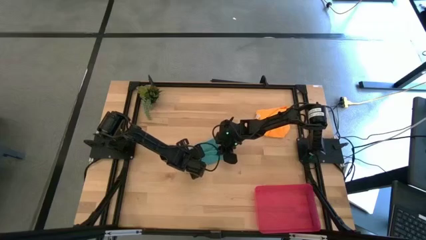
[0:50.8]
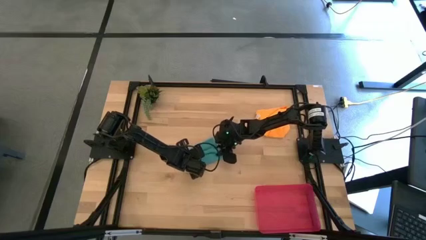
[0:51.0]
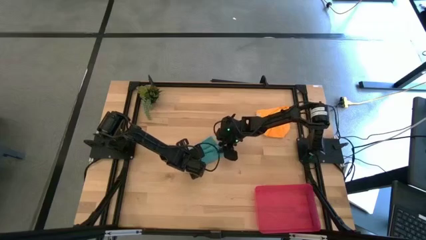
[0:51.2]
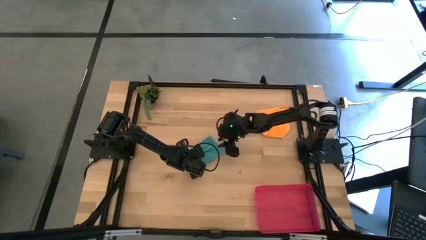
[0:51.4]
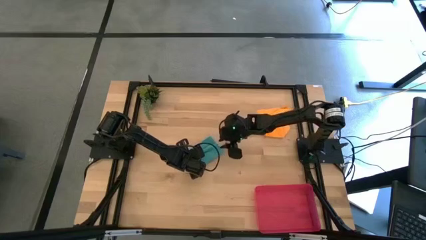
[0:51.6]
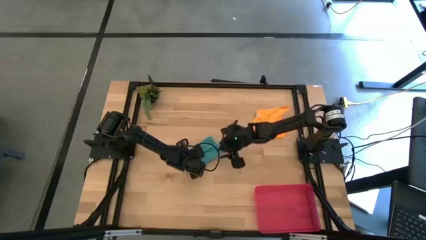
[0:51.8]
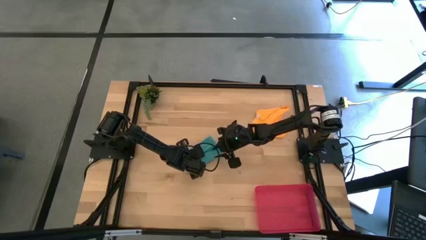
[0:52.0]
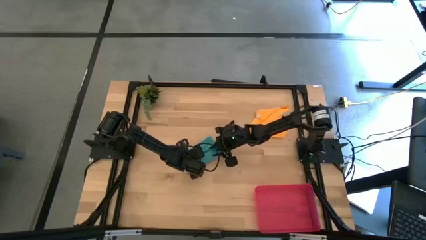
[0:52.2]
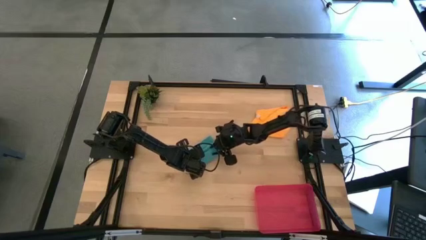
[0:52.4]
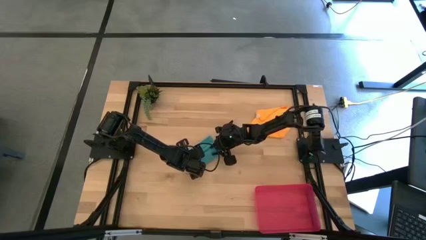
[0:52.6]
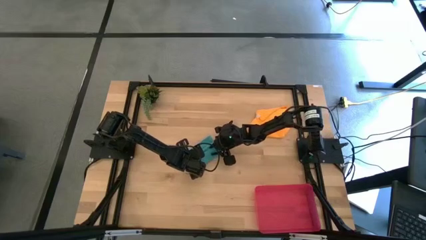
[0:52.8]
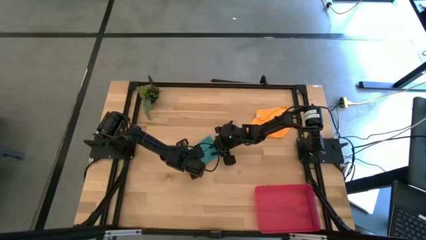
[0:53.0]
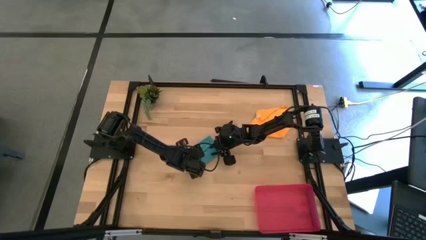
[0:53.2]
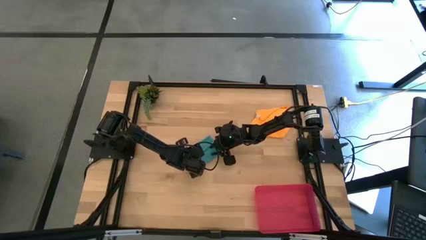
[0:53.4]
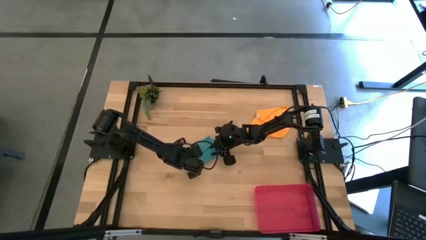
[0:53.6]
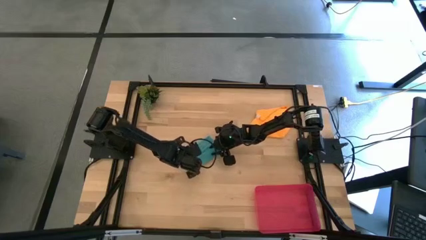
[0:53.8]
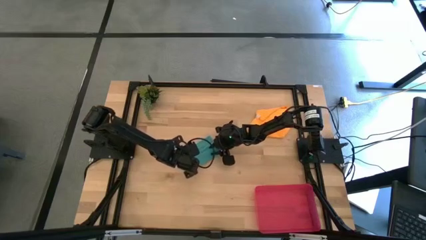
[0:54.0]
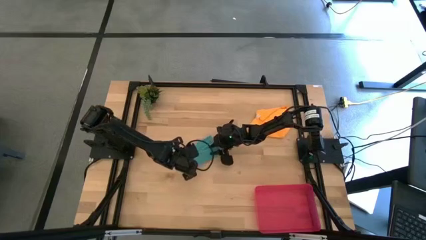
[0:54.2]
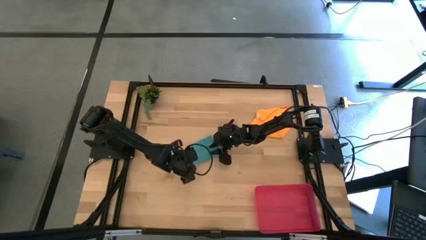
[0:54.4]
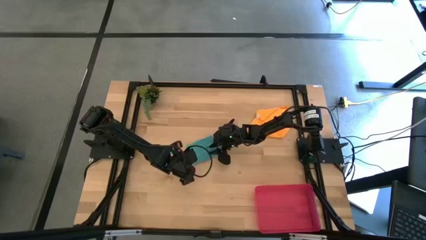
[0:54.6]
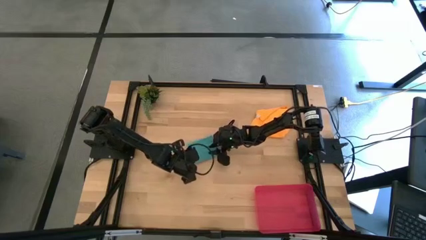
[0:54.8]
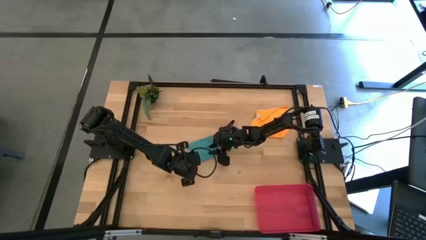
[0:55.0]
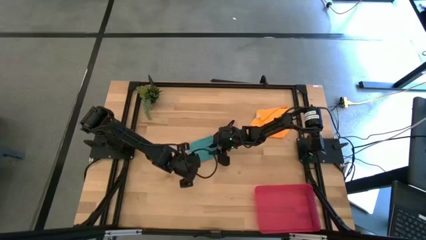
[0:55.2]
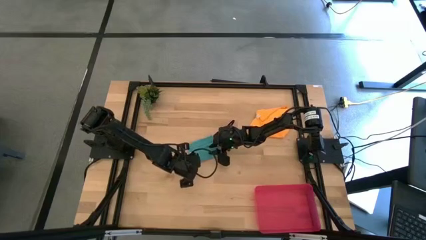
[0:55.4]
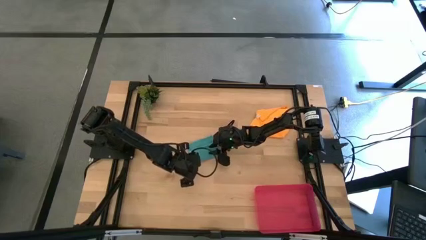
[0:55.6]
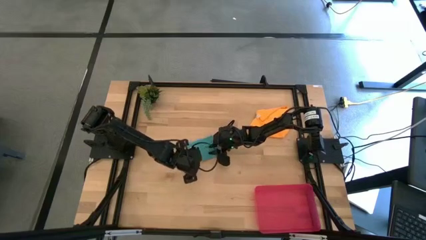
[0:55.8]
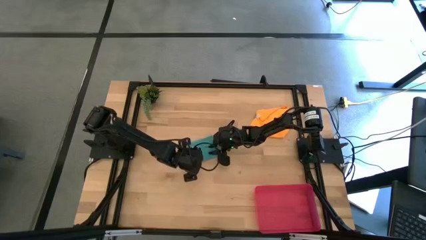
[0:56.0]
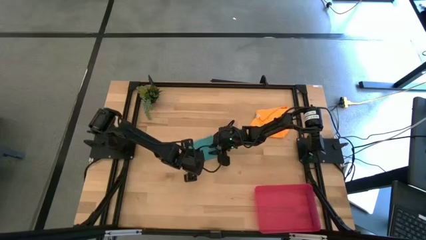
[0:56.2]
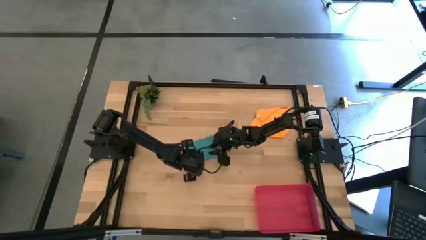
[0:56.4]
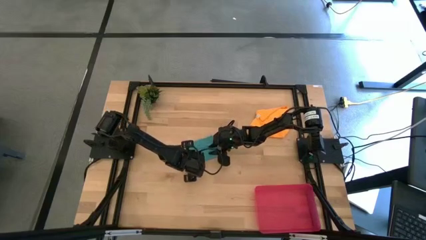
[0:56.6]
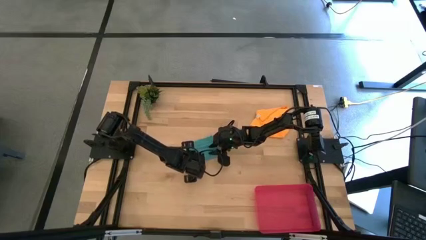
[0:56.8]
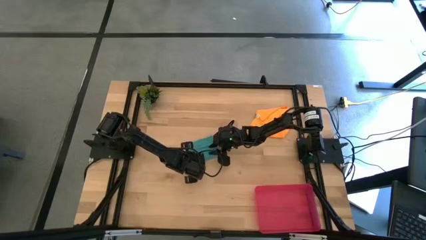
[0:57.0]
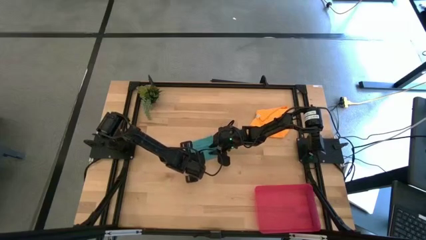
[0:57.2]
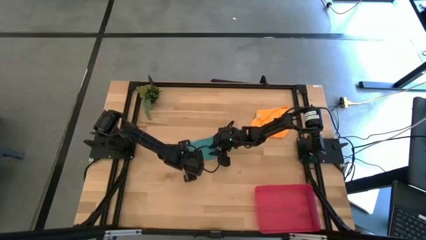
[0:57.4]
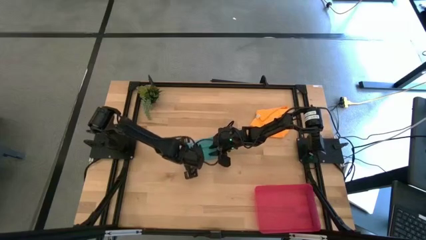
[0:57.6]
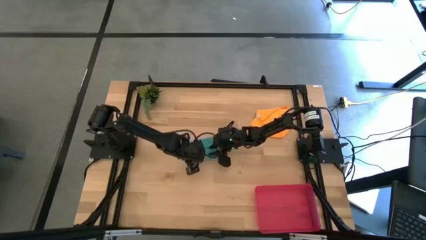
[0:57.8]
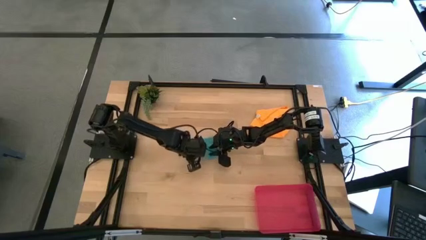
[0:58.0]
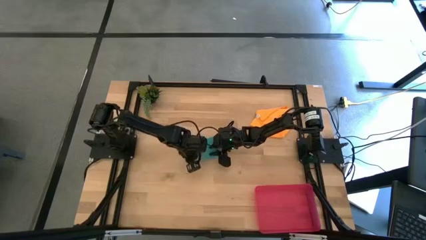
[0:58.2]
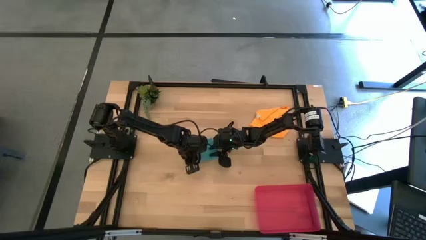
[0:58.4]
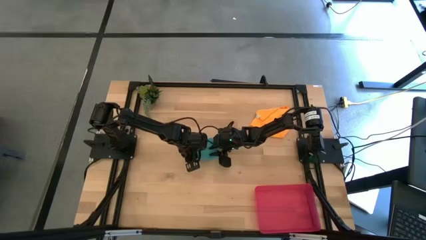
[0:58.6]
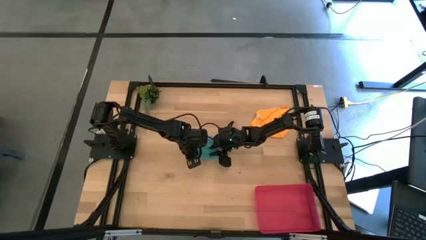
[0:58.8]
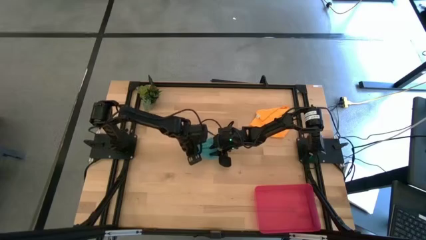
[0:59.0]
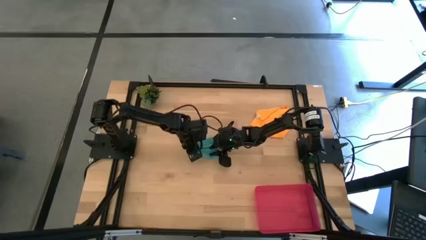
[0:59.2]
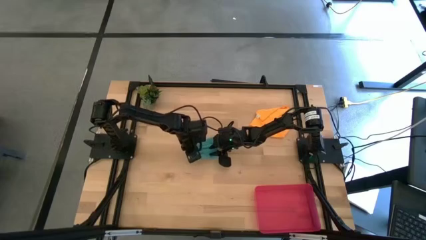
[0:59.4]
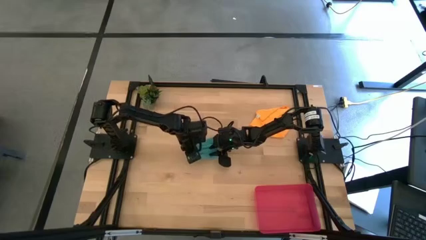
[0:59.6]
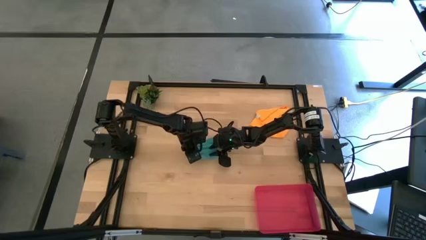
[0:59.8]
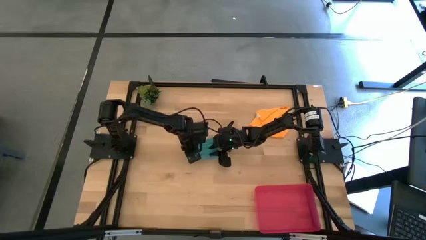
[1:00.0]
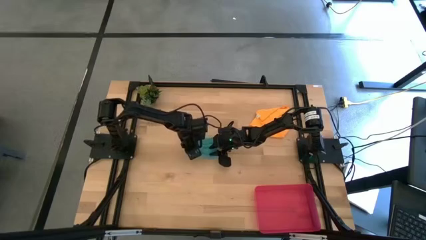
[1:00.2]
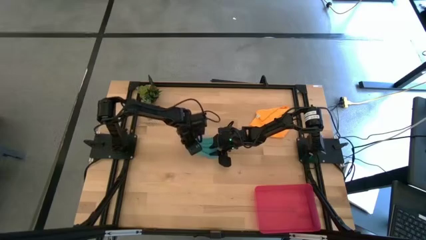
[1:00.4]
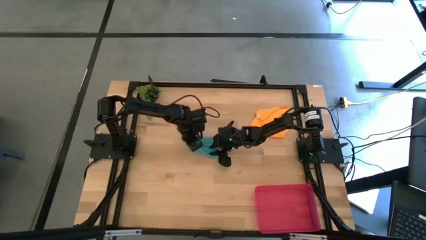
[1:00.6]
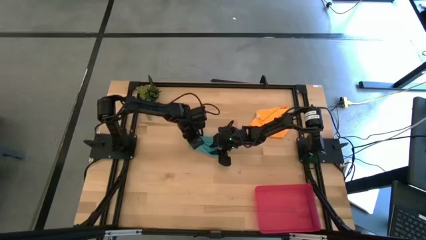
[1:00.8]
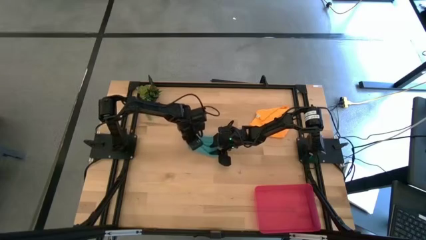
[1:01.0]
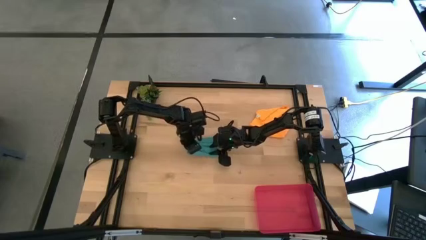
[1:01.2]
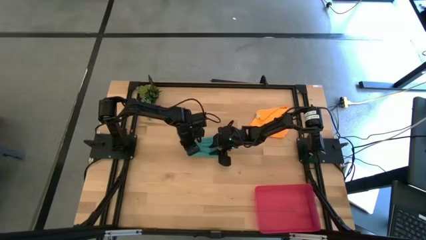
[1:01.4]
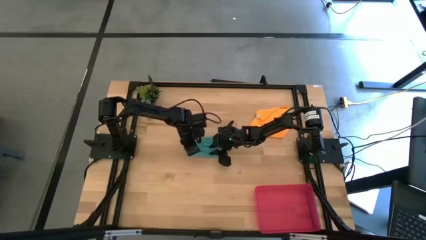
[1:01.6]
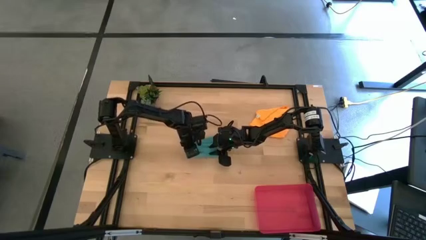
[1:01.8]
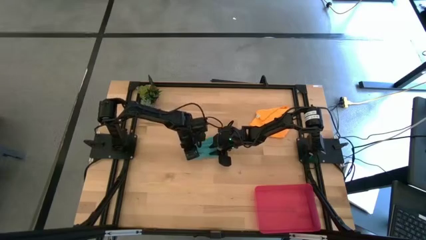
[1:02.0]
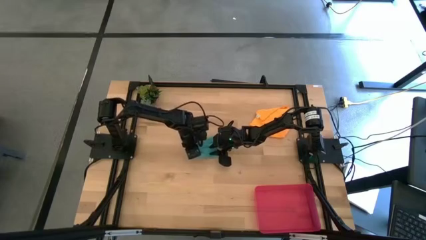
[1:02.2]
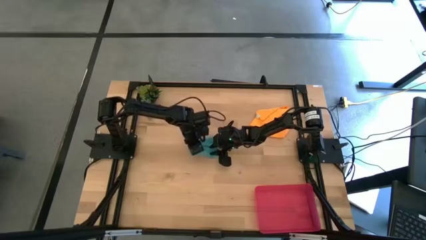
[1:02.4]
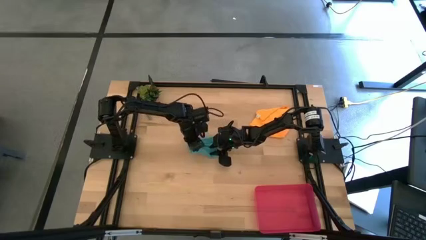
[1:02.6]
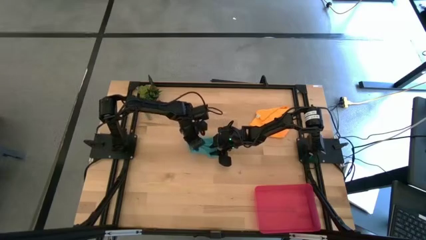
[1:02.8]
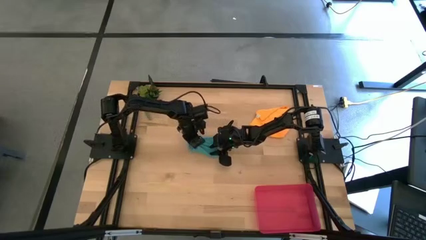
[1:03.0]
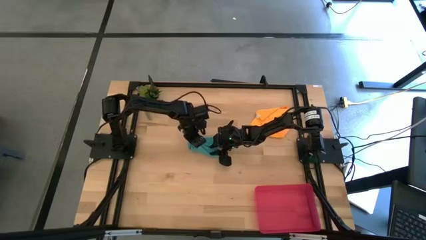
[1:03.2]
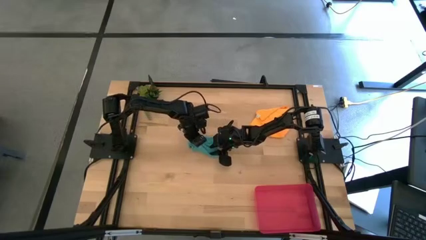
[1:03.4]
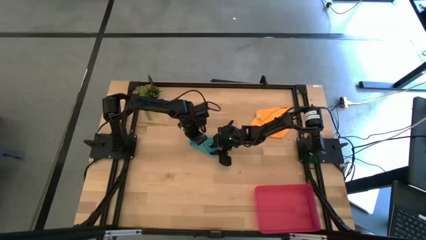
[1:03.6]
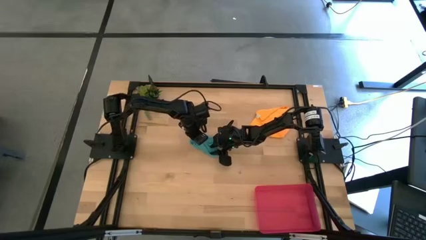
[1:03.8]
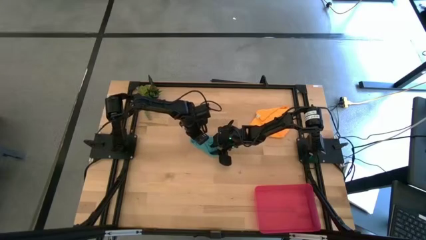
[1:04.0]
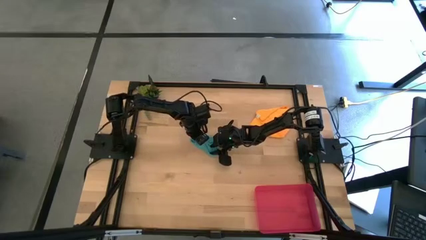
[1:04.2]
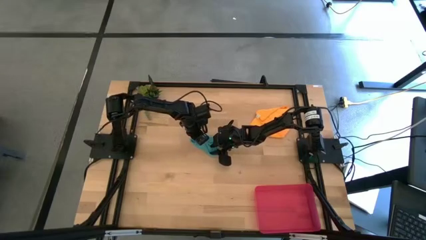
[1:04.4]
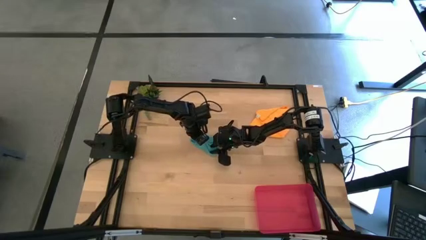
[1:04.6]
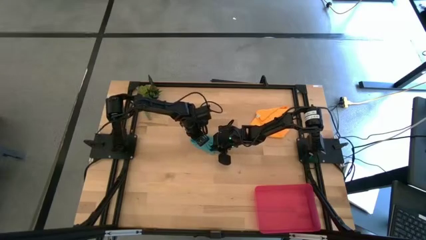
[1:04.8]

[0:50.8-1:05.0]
Task: Roll microfiber towels into tight, uniform cylinder then place into a basket
Roll the blue microfiber cloth
